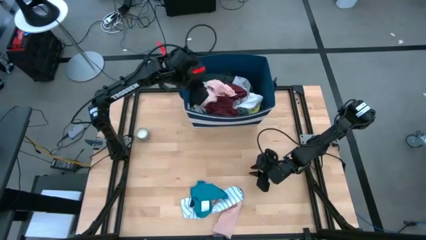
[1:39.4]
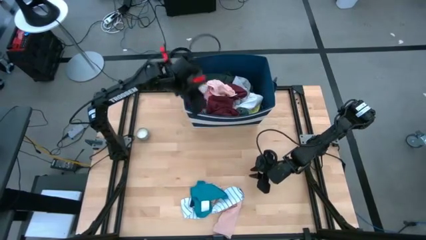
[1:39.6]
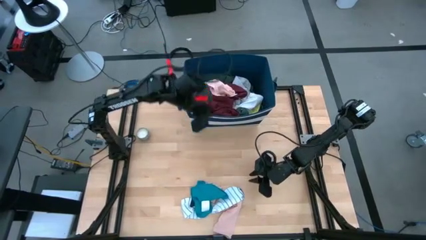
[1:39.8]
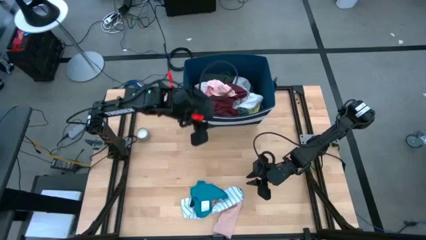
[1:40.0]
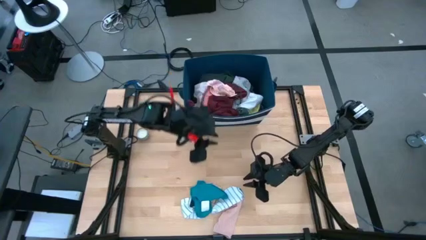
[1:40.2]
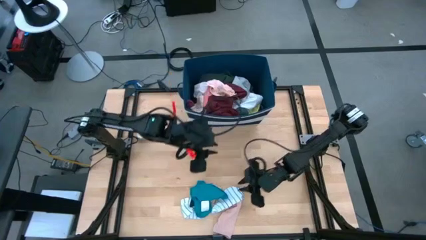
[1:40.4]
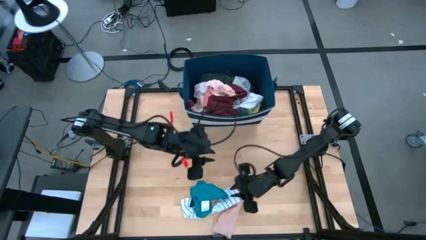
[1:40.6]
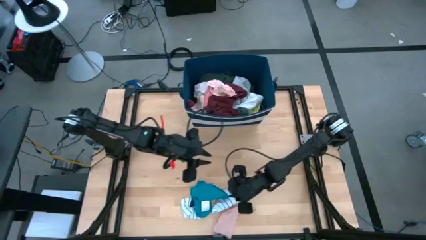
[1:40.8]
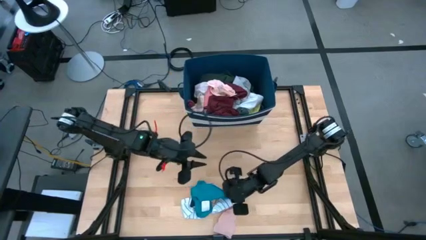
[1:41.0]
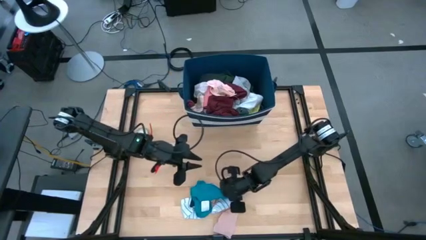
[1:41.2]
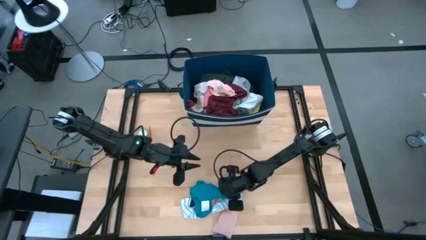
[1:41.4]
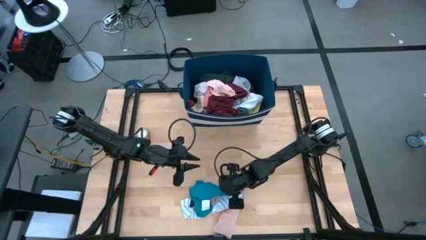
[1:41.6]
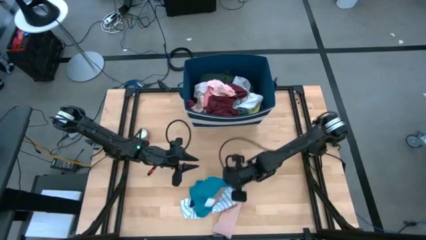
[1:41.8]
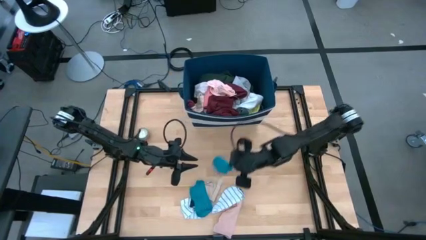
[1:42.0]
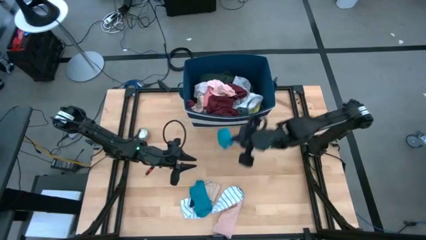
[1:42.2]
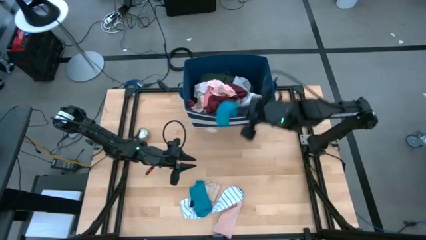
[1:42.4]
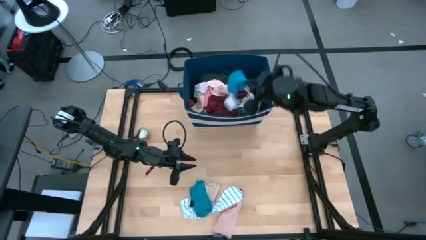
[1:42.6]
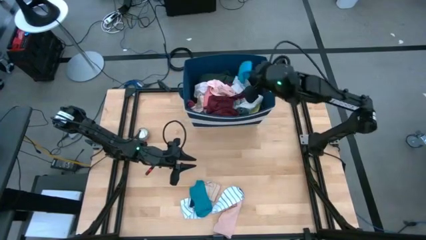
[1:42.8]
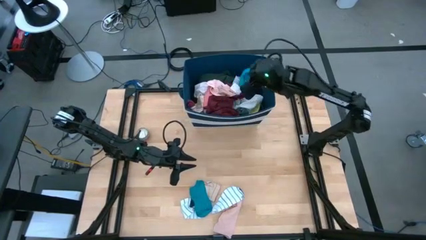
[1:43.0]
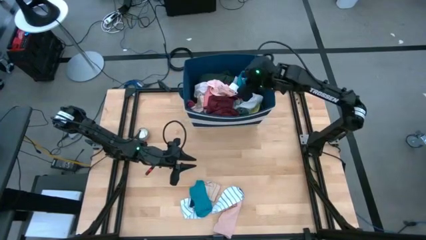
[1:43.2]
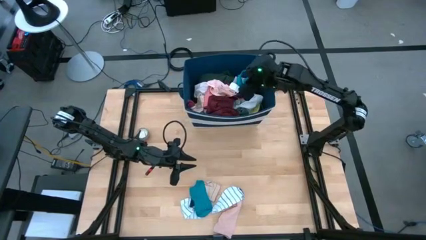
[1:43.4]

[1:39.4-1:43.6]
Task: Sort clothes
Put the blue sock into the blue laundry bin

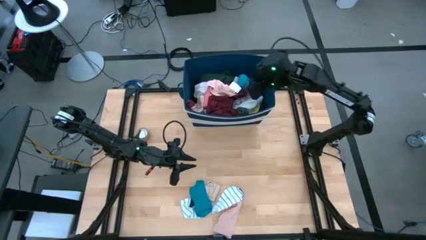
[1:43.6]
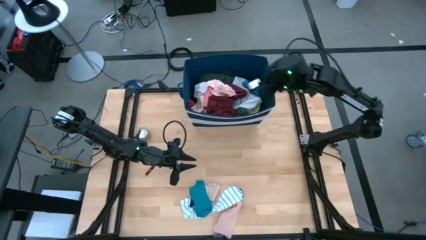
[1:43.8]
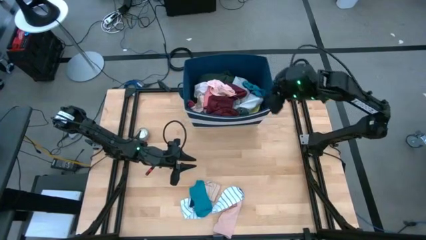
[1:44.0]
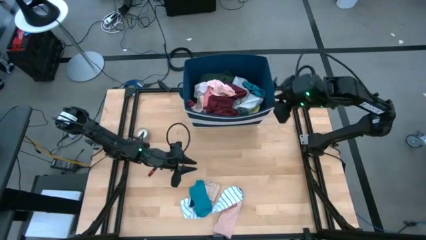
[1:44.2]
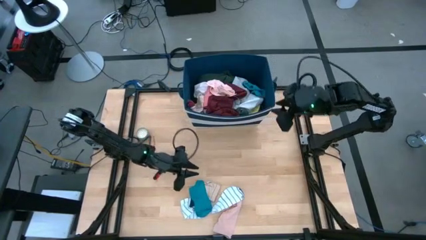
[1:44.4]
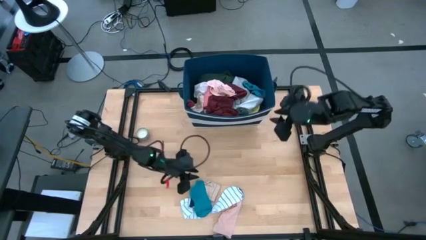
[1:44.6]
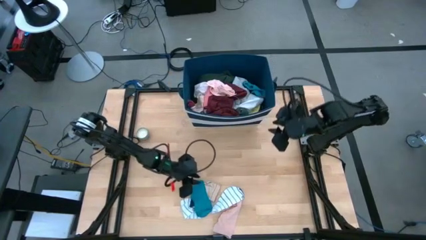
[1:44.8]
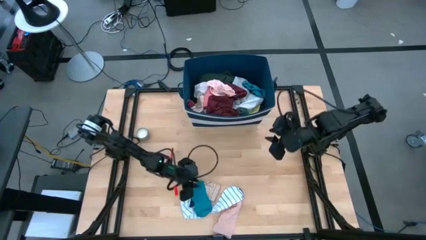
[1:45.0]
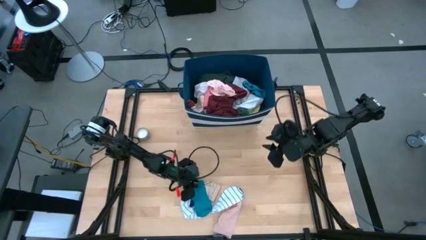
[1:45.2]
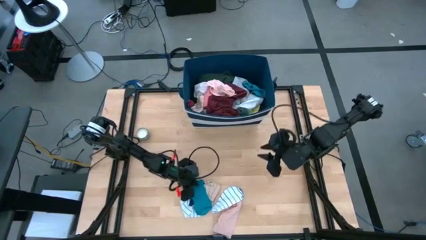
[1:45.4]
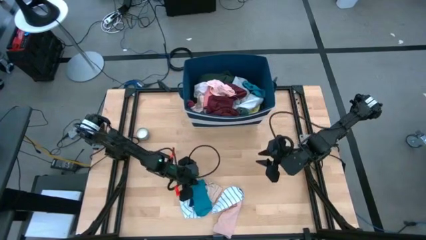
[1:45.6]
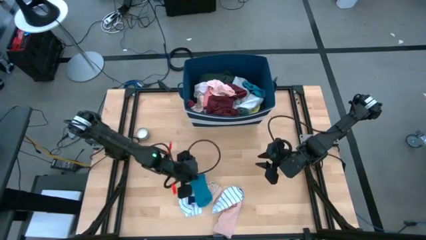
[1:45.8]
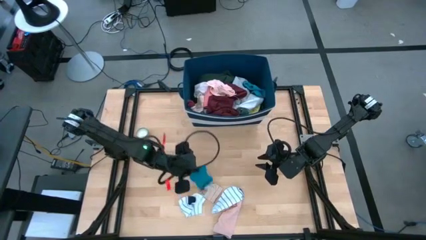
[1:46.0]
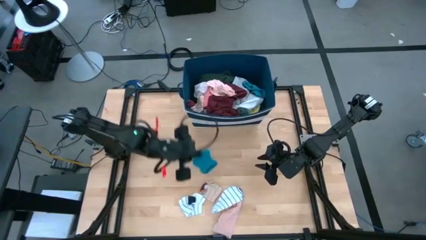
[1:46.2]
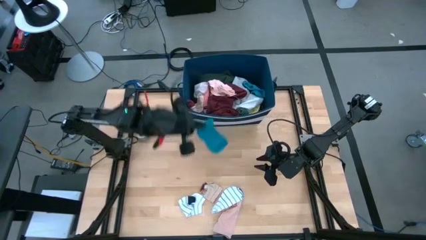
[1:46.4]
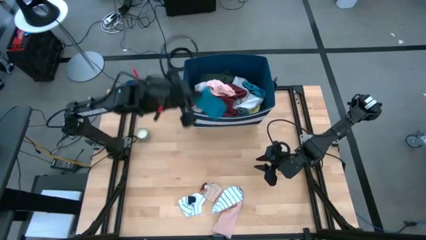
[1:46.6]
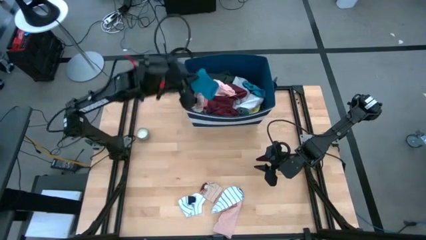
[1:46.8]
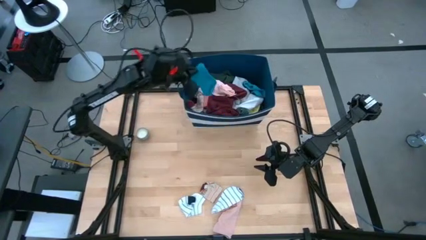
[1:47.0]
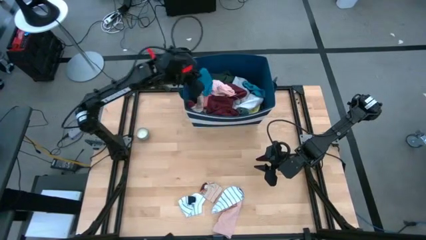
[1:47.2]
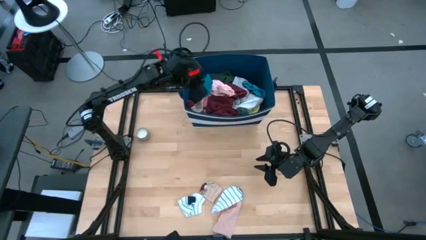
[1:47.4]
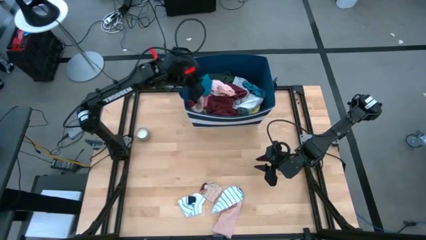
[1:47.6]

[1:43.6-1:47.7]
Put the blue sock into the blue laundry bin

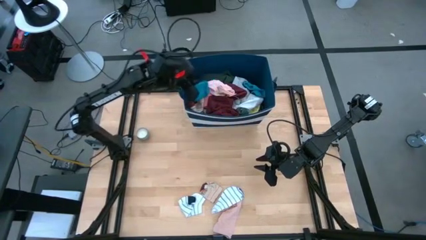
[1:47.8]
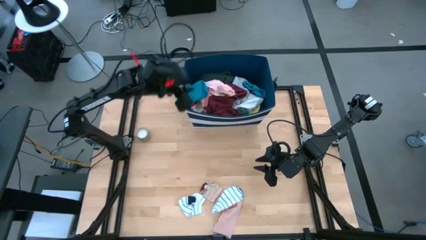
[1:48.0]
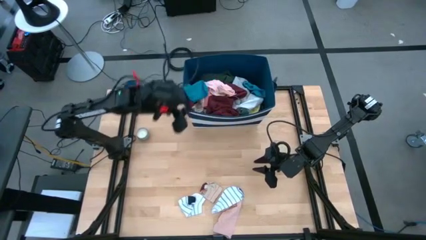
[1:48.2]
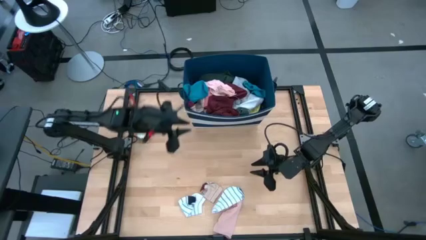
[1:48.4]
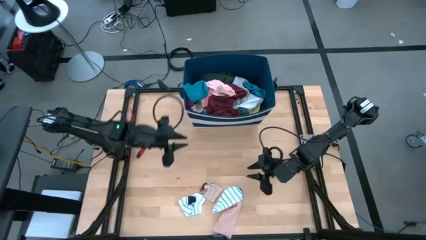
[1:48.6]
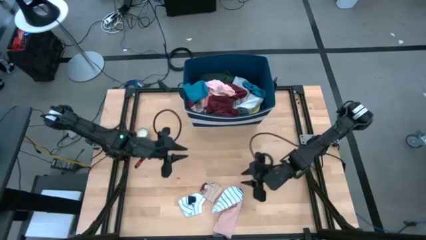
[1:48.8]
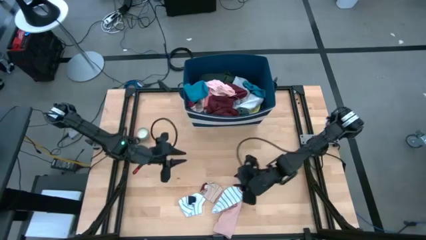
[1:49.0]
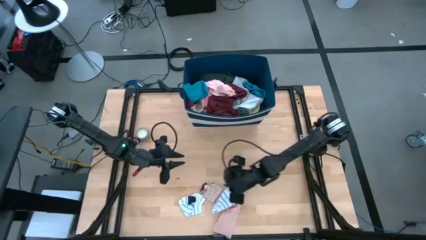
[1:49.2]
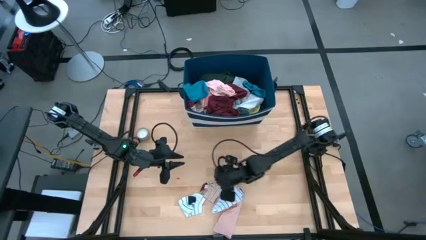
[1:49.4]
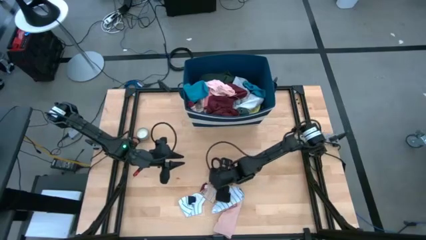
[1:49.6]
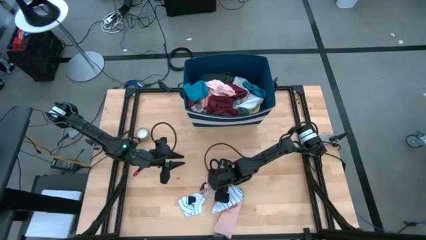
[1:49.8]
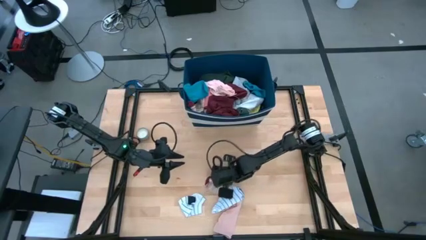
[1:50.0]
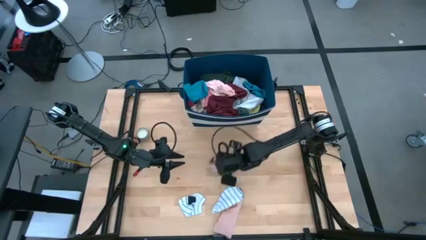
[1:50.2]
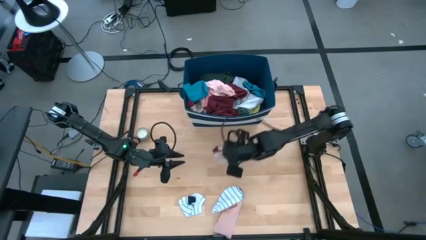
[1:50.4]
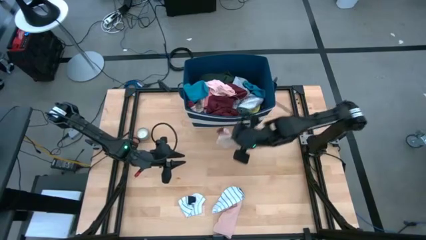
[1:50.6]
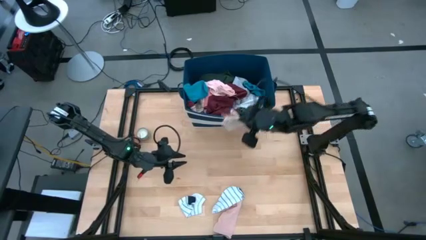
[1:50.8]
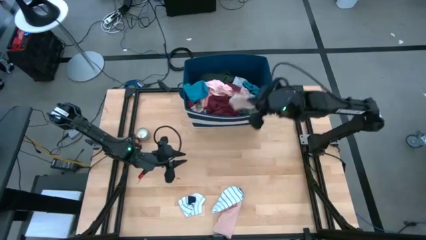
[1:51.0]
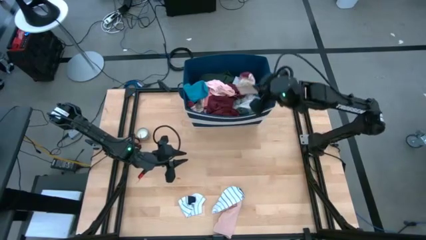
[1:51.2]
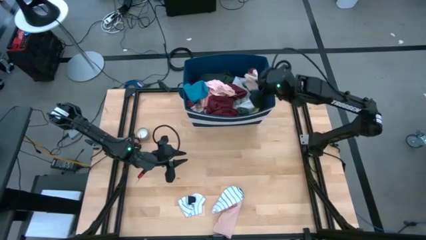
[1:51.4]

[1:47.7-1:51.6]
Put the brown sock into the blue laundry bin

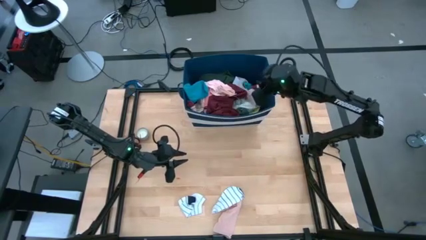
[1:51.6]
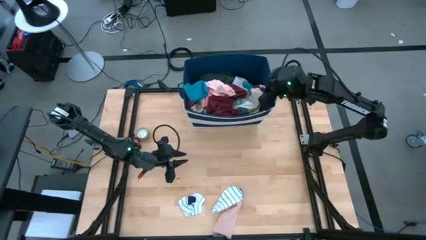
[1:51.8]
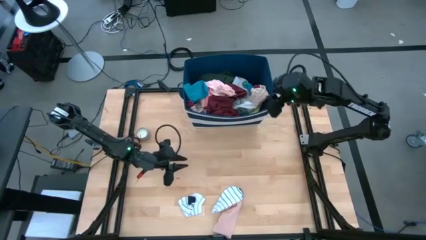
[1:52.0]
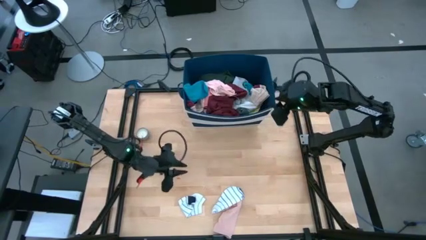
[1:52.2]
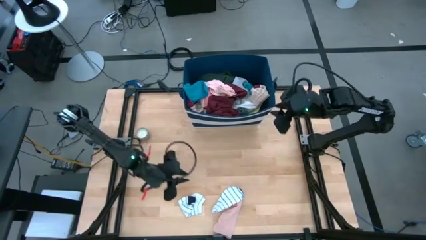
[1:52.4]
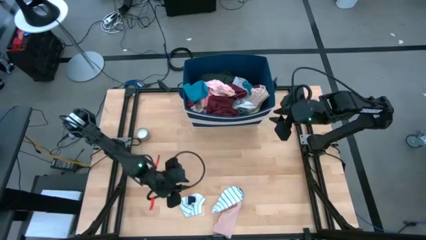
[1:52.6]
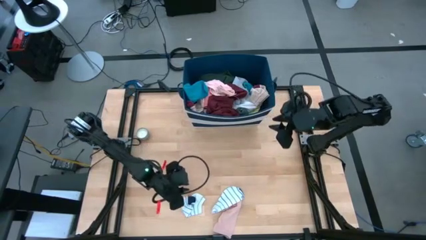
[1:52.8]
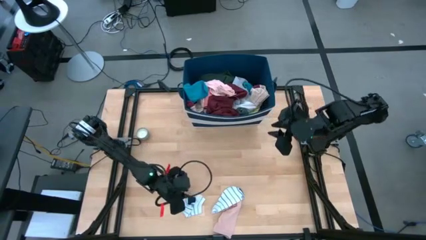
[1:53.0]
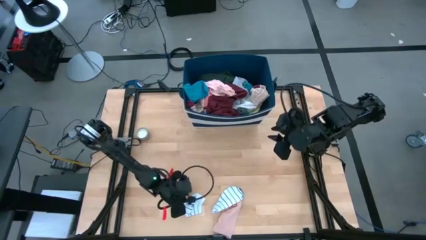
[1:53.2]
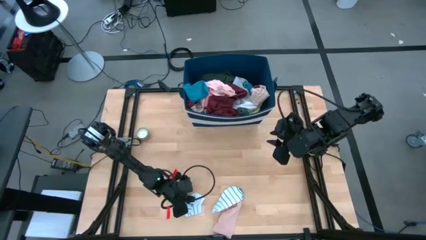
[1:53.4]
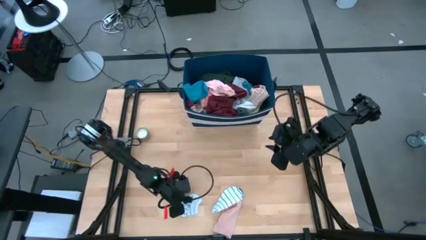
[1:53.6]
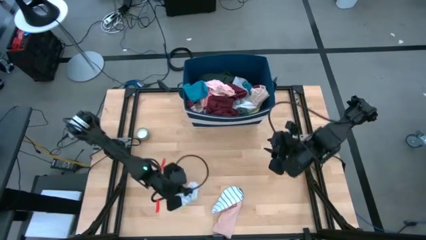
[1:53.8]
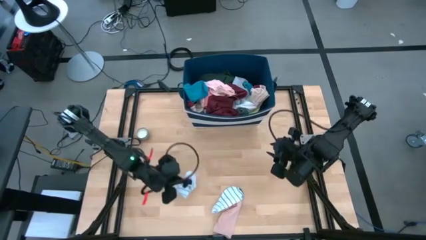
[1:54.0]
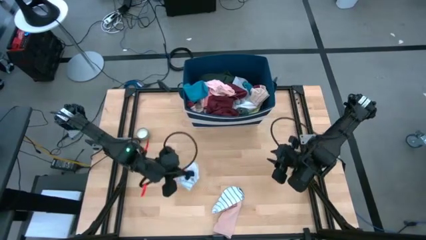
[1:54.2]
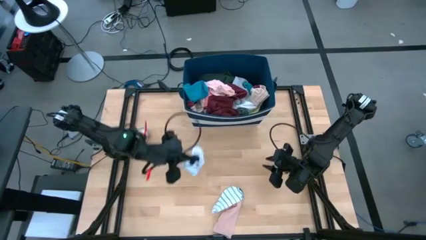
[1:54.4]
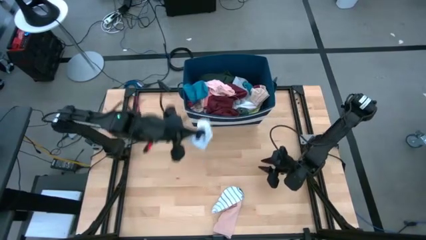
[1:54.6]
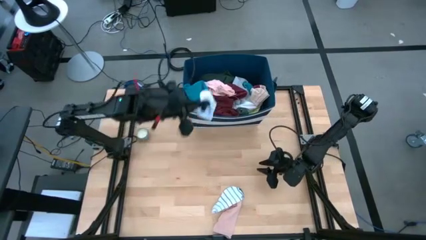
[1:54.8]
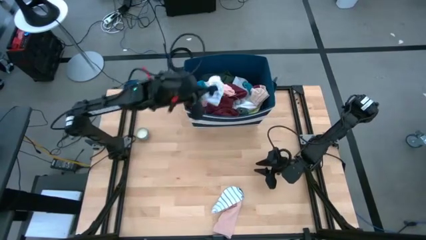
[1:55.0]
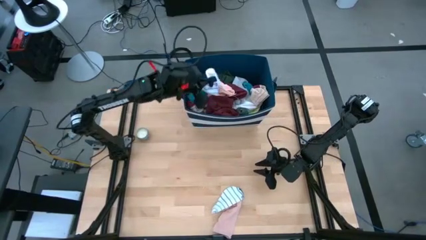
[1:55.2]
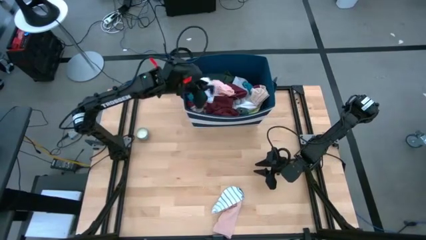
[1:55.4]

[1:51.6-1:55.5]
Put the left white sock into the blue laundry bin
